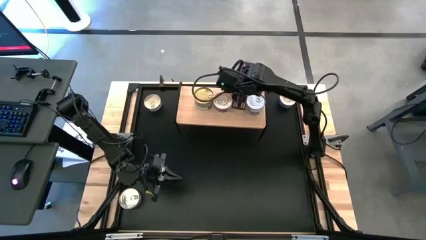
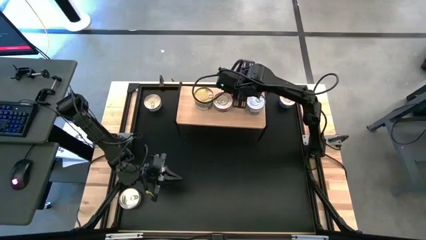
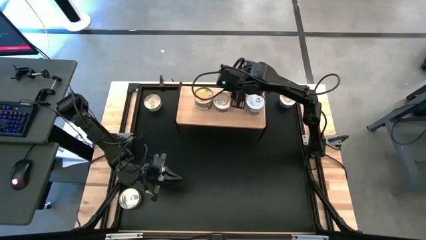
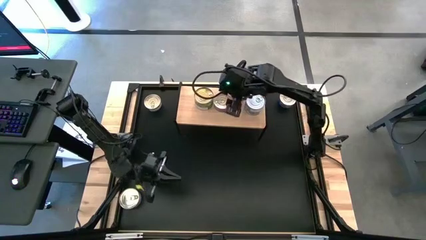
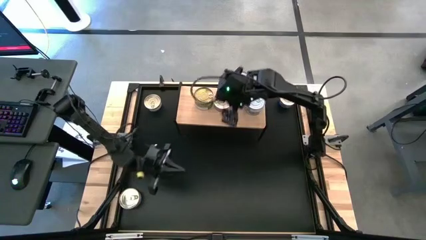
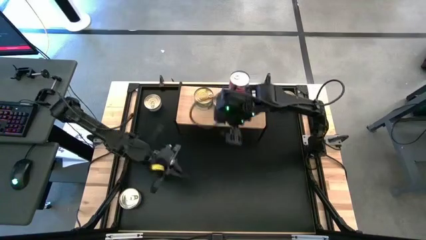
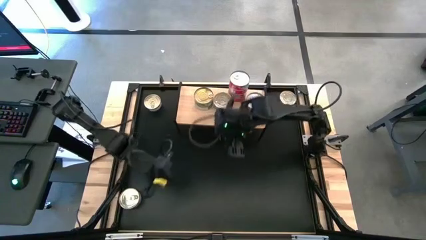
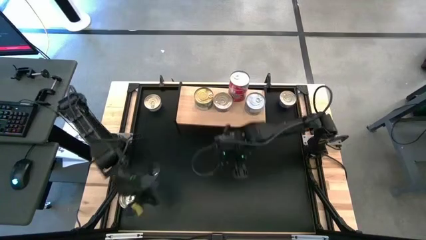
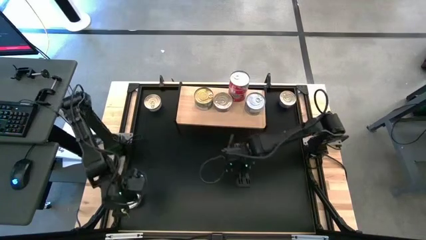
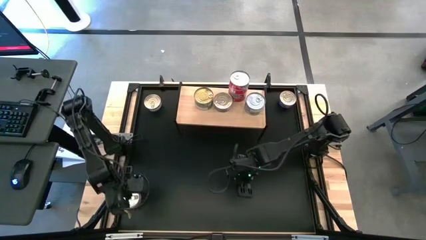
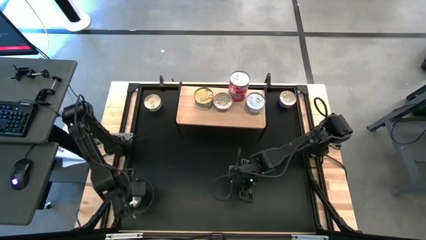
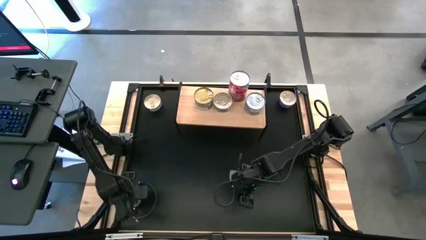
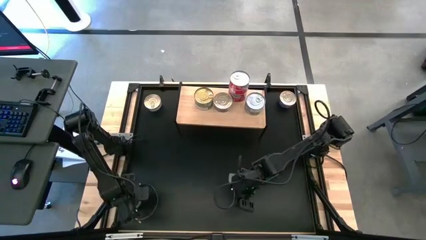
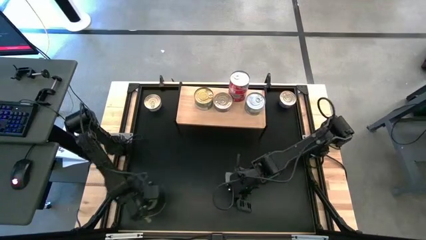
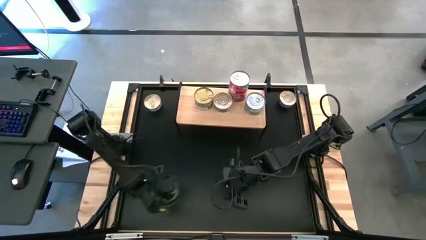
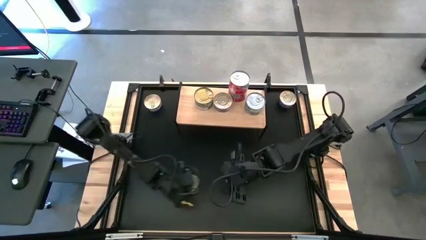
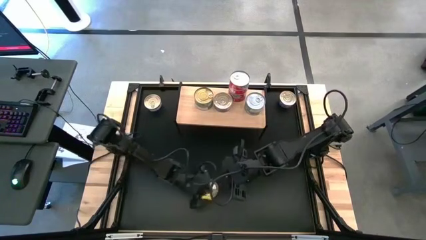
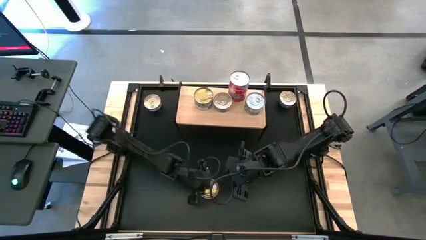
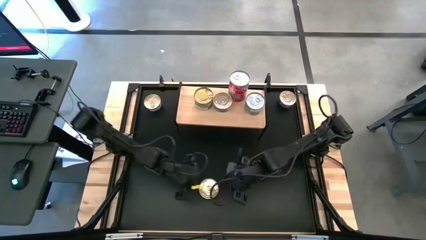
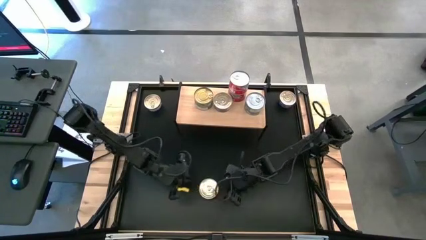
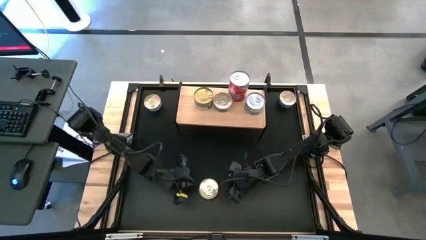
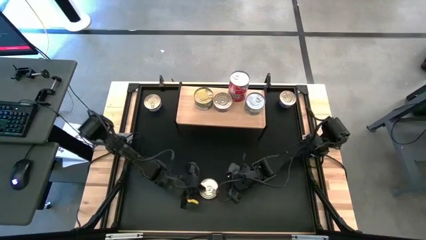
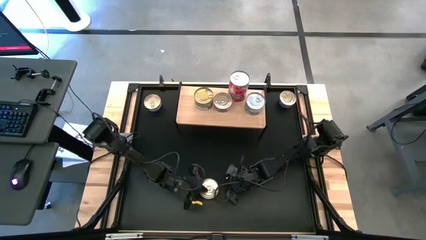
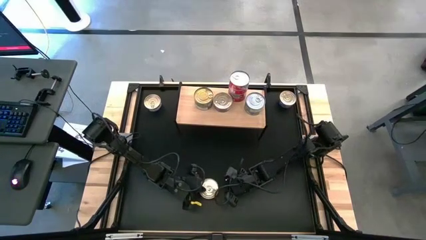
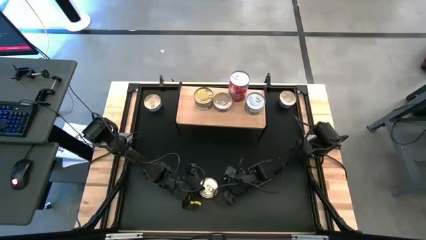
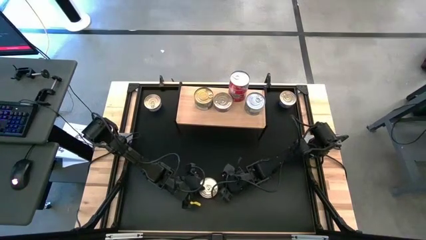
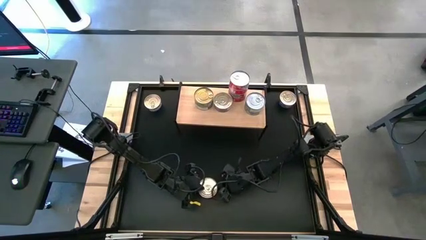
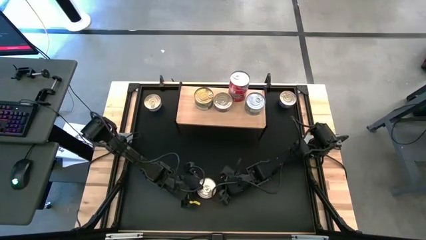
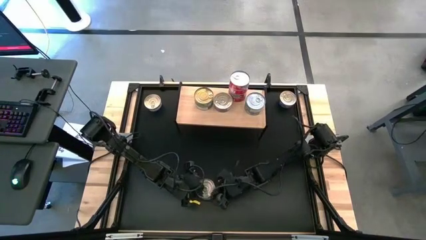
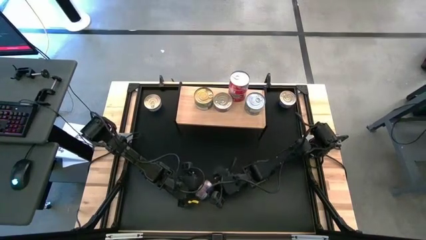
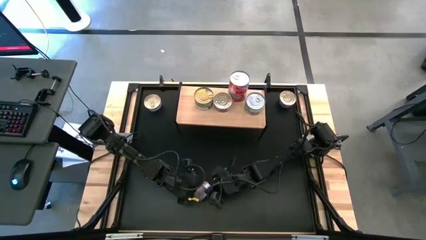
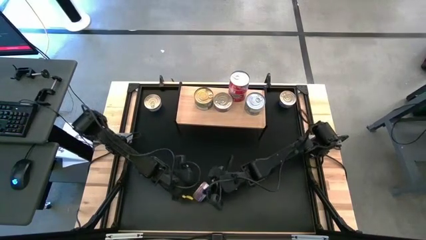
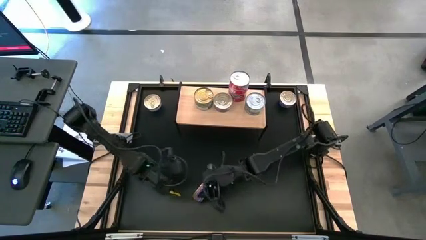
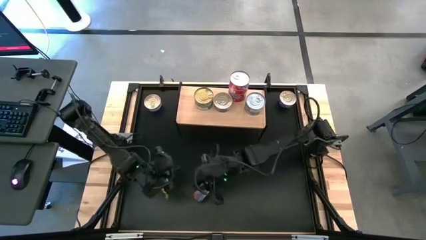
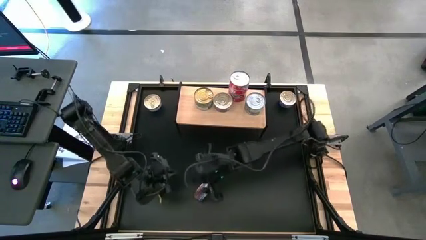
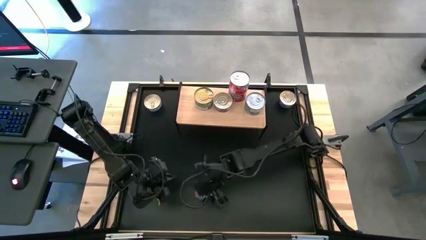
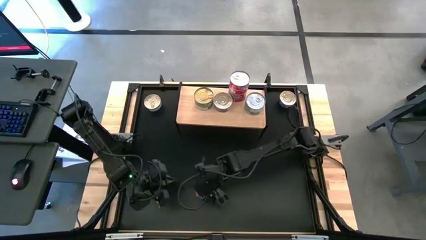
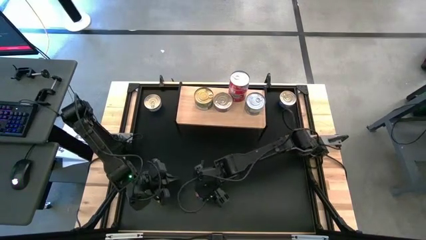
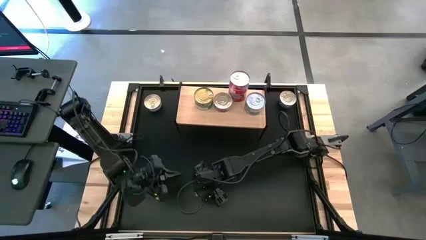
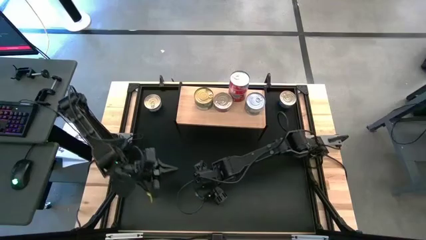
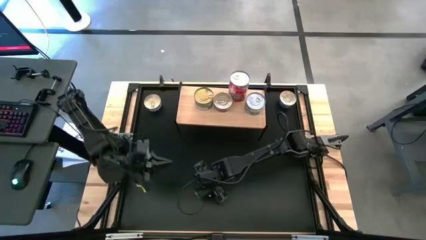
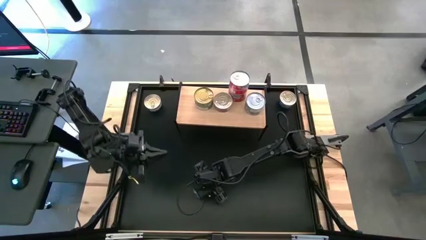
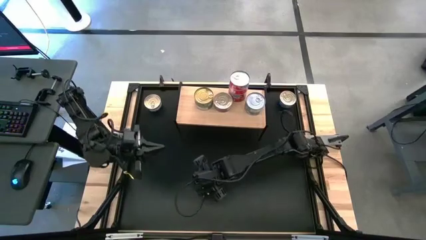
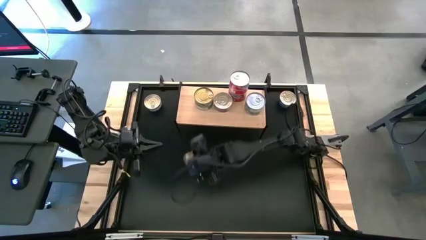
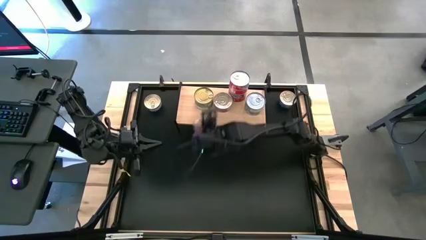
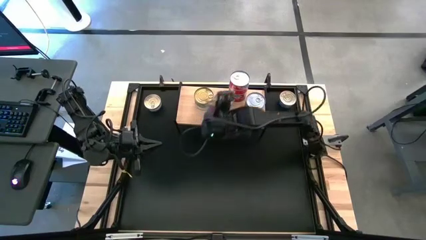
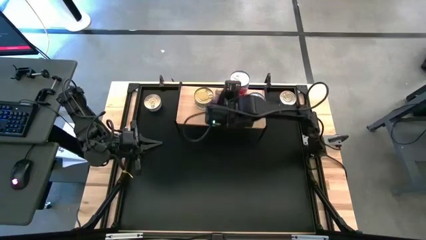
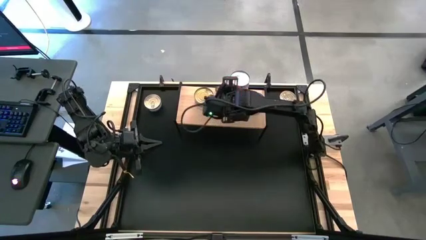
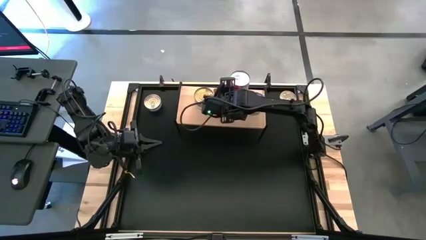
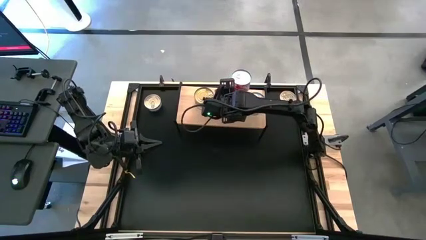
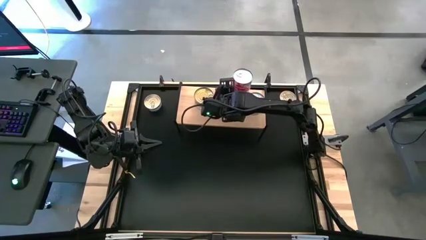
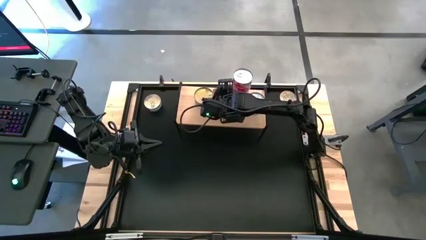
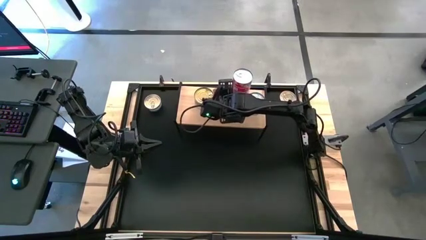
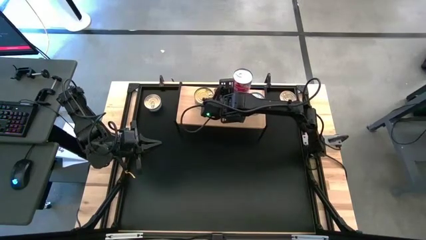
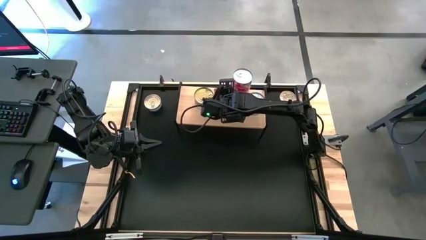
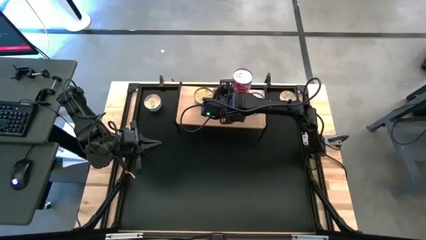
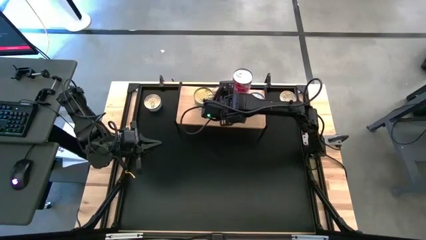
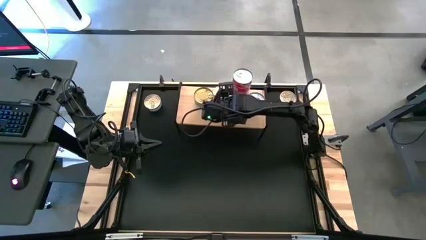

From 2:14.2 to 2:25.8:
Task: Stack canned seafood by type on shelf
Stack the blue tuna can on top of the blue tuna can on the shelf
